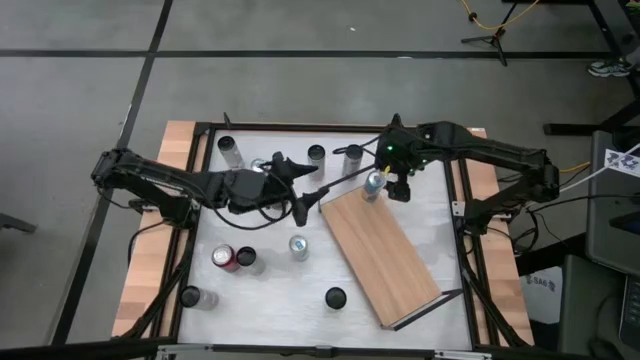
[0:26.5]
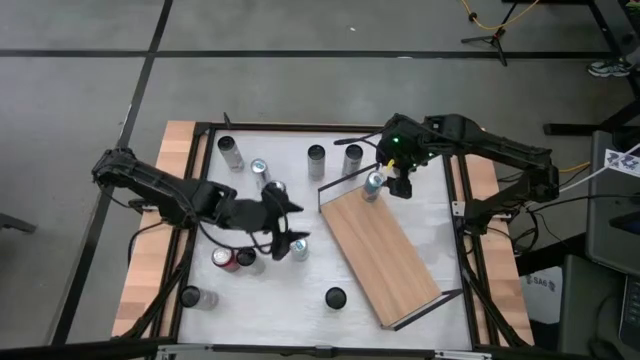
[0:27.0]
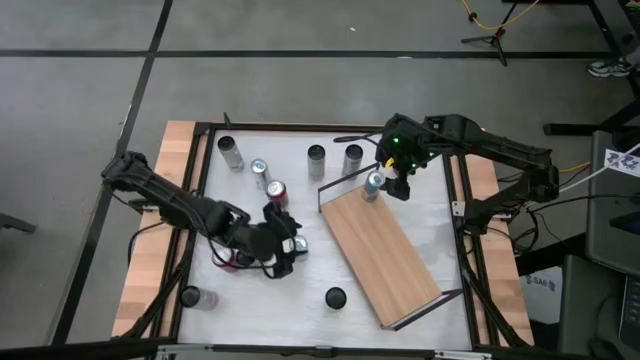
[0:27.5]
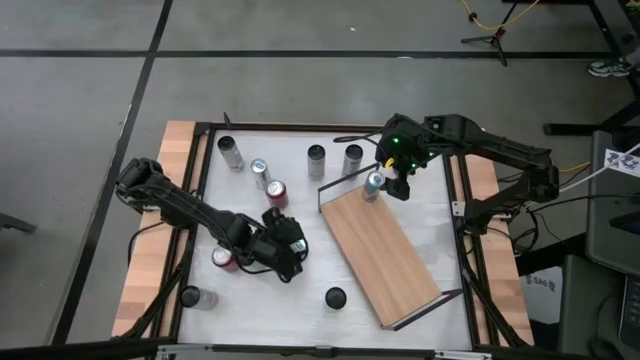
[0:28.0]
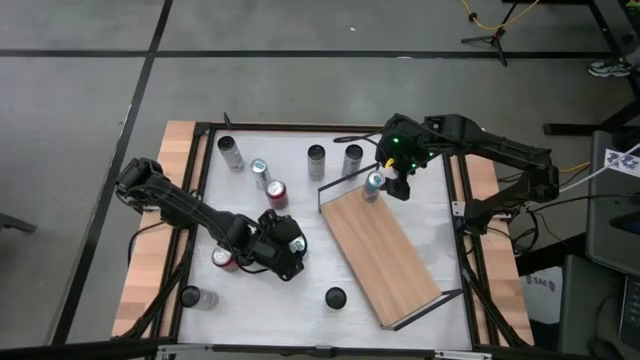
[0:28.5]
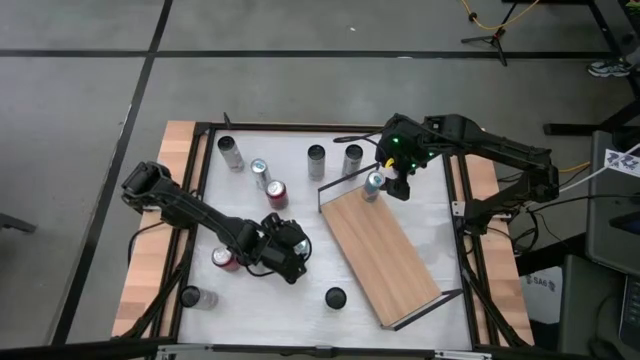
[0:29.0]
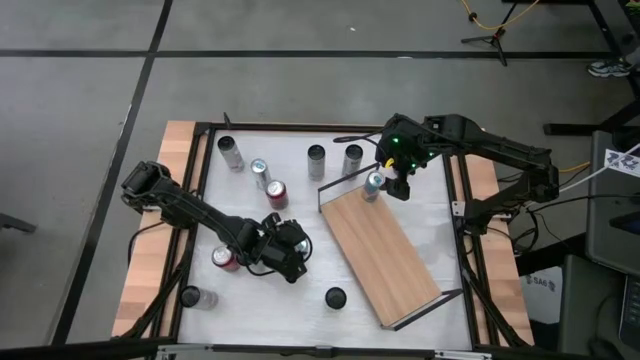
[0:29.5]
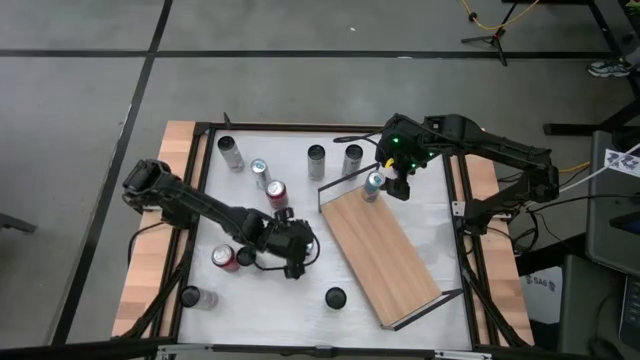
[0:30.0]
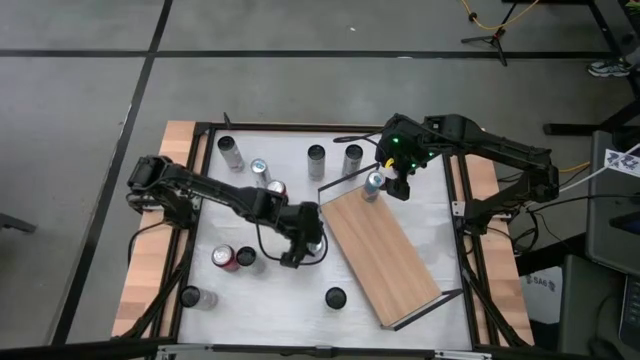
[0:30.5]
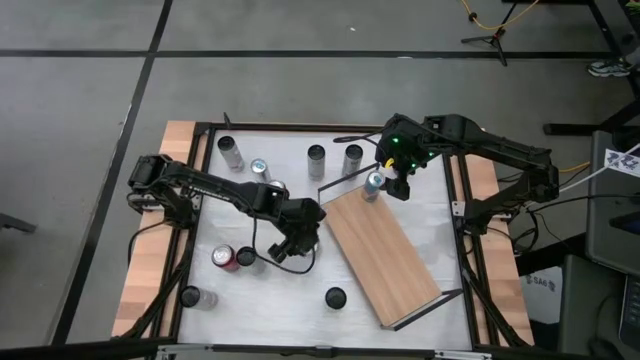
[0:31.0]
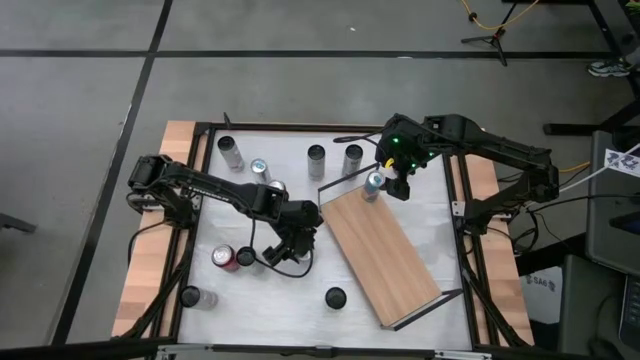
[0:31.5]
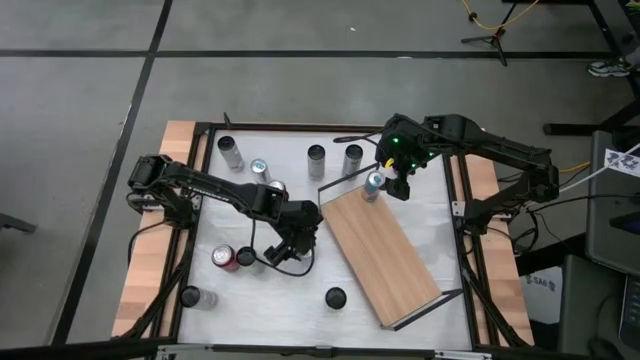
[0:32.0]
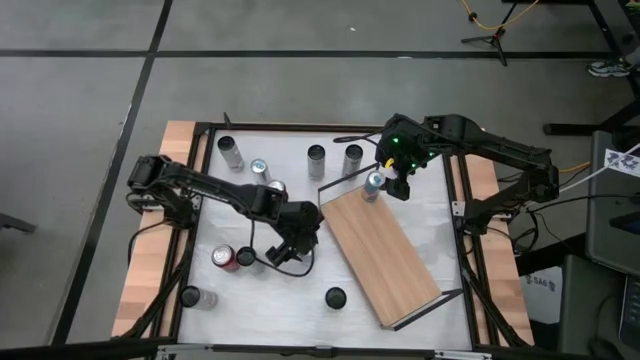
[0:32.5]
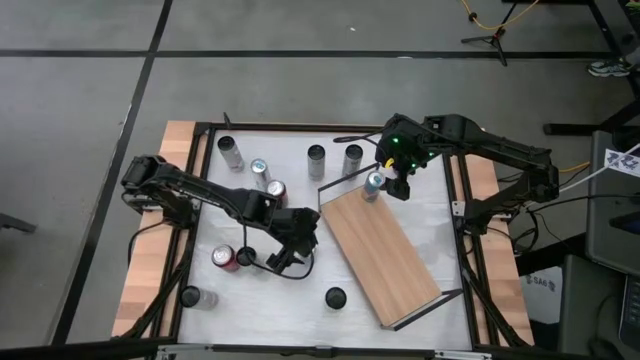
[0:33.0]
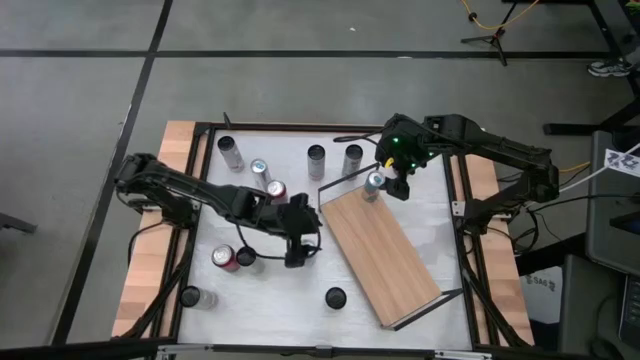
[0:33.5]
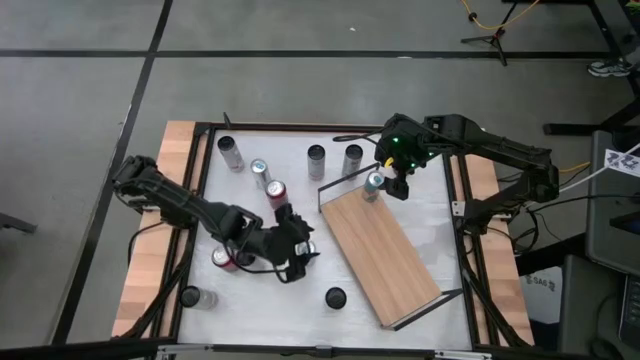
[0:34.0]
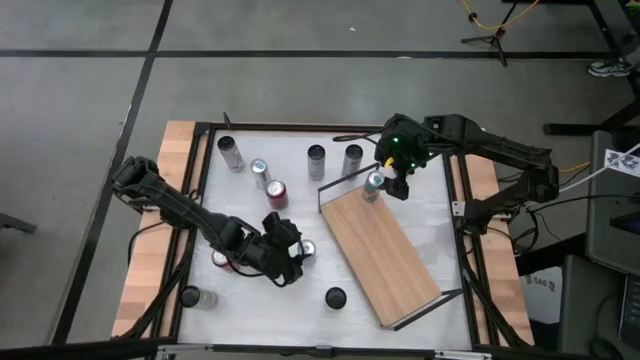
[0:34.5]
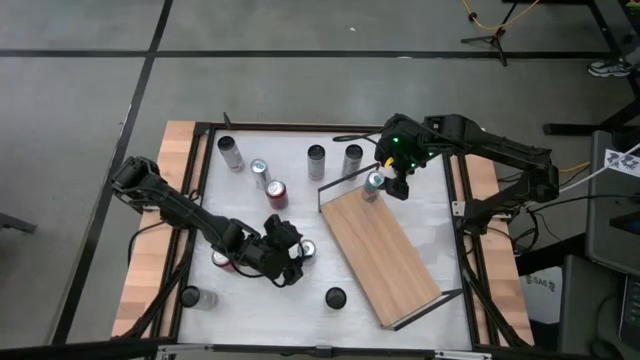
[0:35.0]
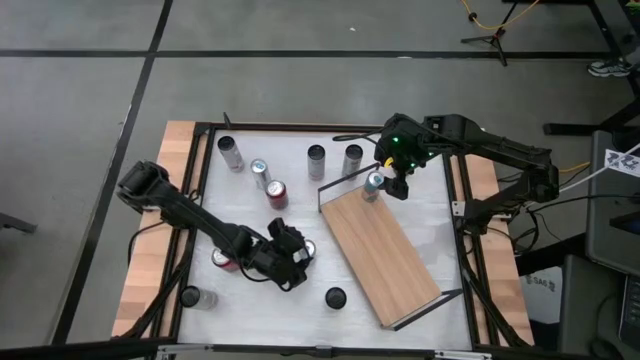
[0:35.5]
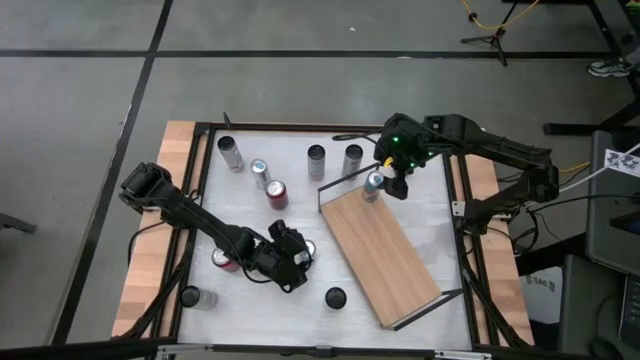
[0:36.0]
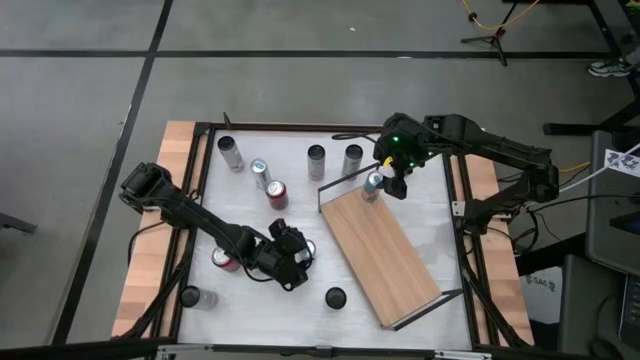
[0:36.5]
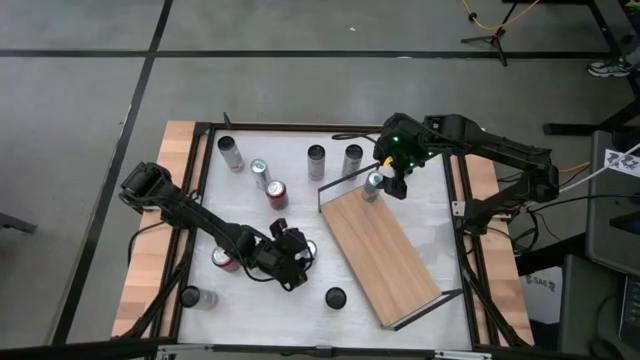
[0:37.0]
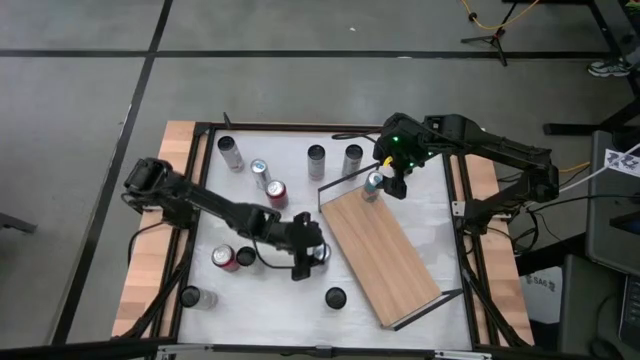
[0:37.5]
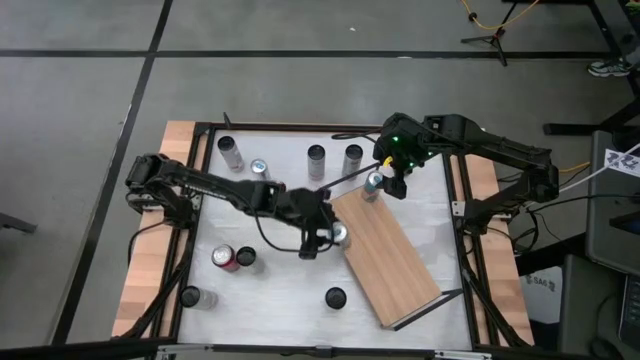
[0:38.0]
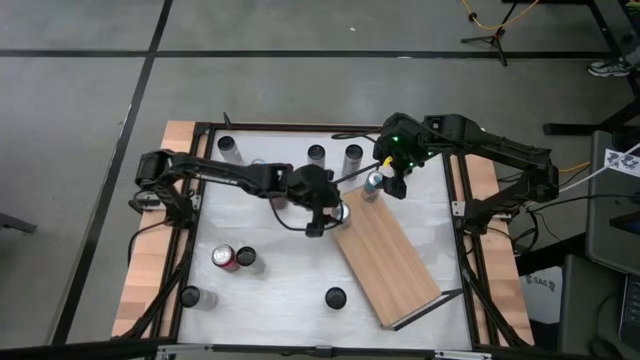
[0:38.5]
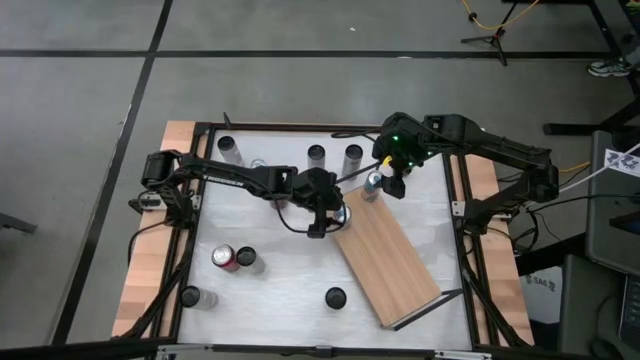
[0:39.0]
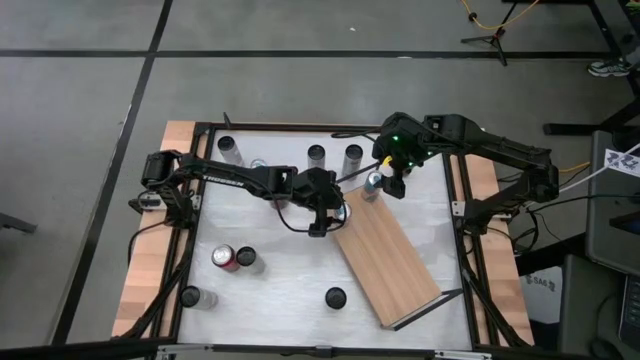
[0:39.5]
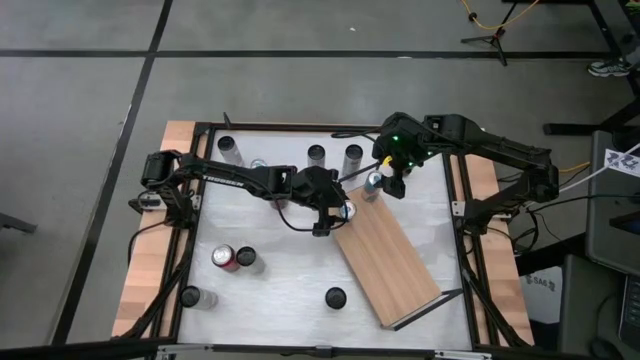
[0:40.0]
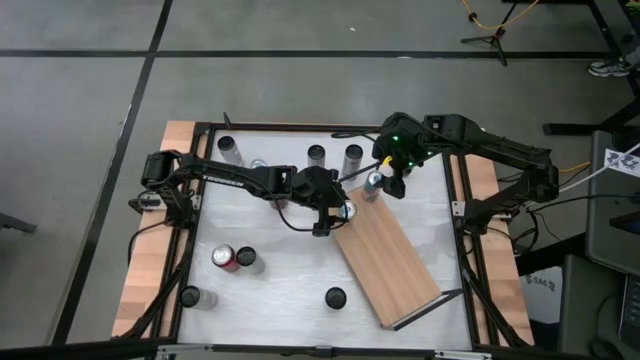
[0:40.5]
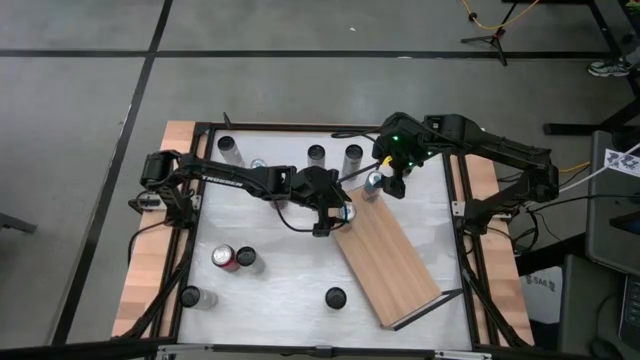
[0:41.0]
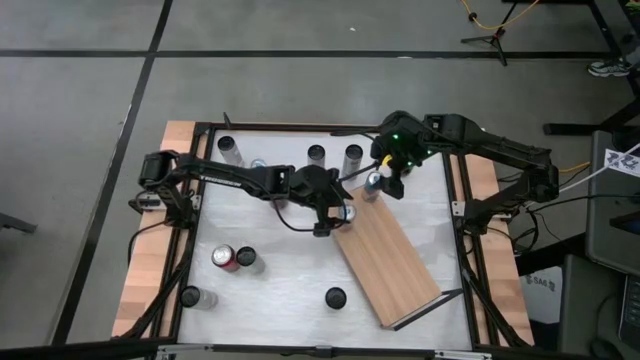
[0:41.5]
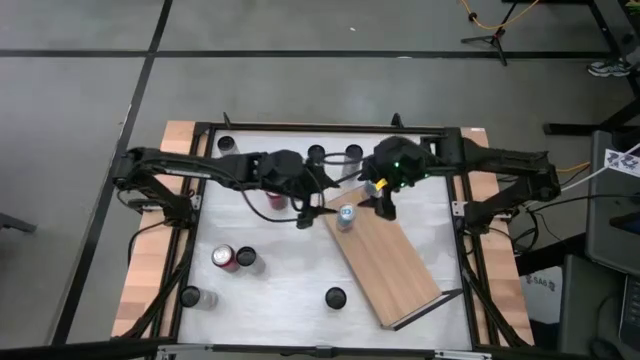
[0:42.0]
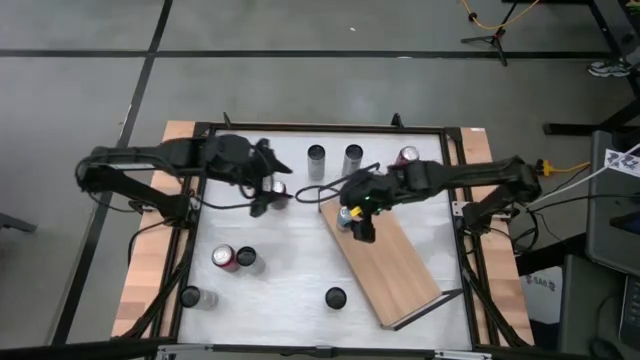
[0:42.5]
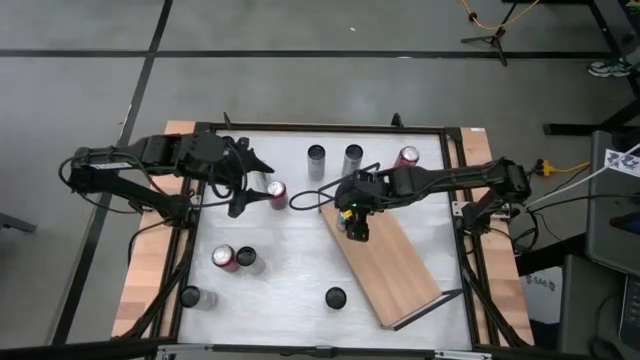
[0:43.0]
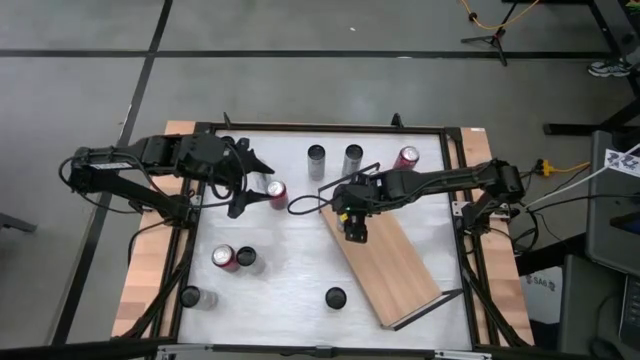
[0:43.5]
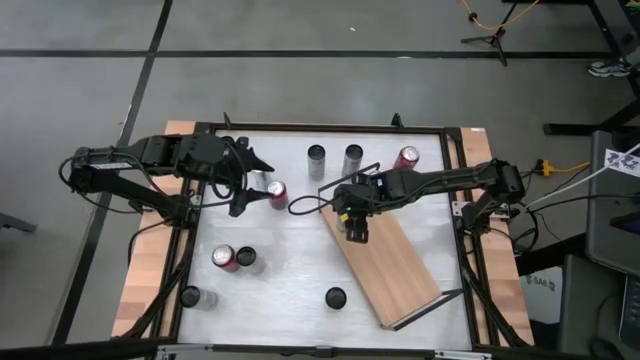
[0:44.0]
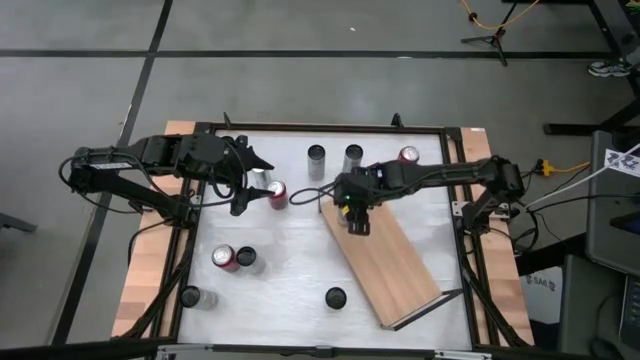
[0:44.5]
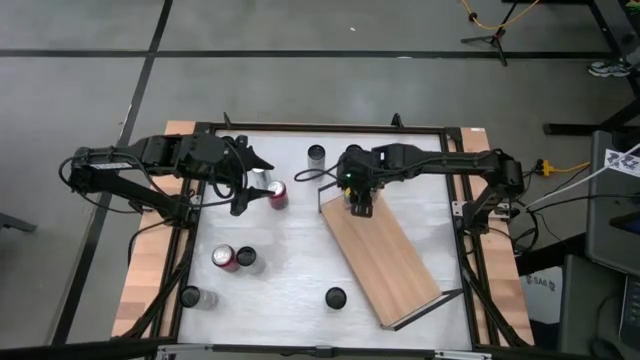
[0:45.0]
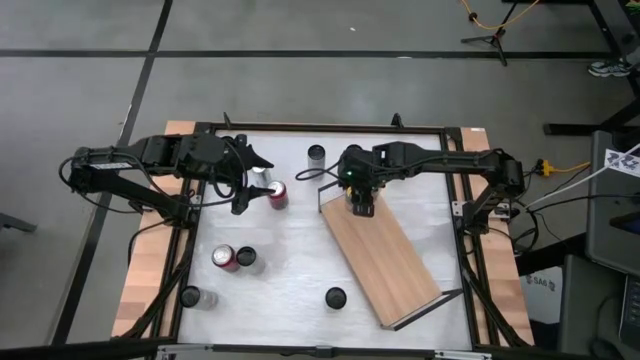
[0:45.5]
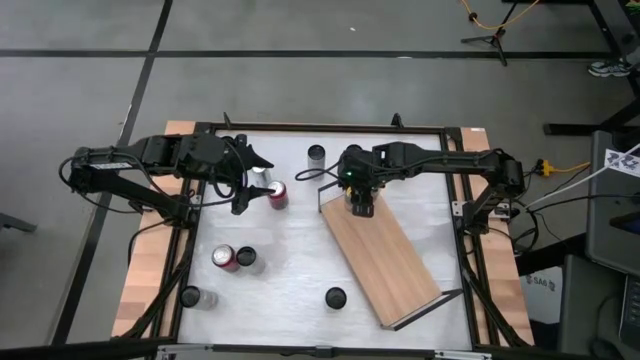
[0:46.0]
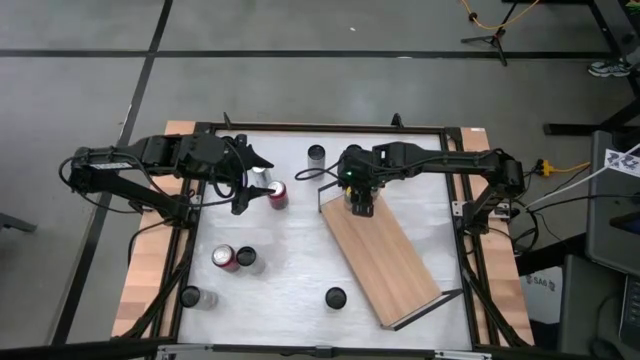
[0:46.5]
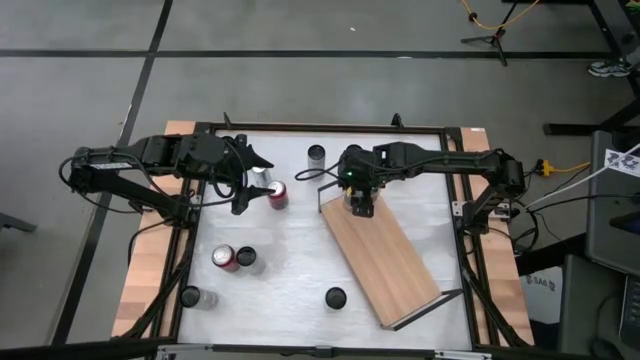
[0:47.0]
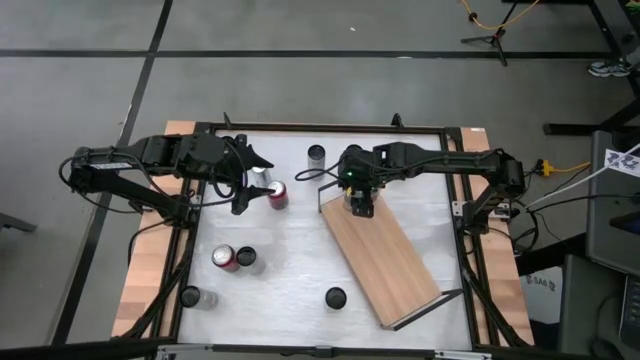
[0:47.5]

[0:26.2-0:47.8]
Task: Place canned beverage on shelf
Put the blue soda can on the shelf aligned with the other blue soda can
